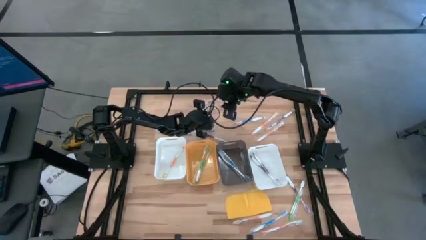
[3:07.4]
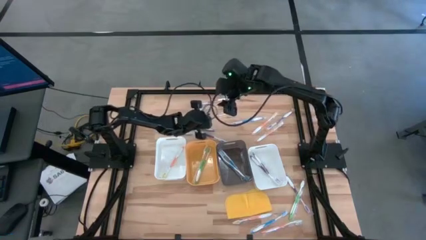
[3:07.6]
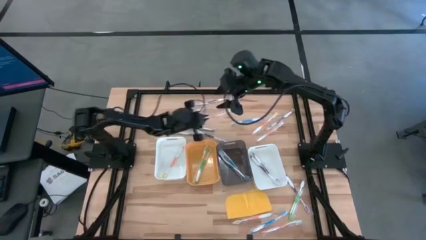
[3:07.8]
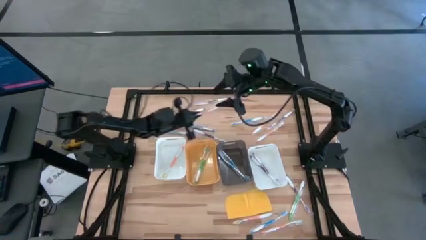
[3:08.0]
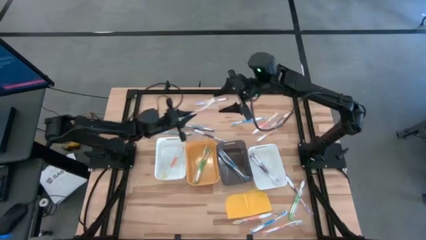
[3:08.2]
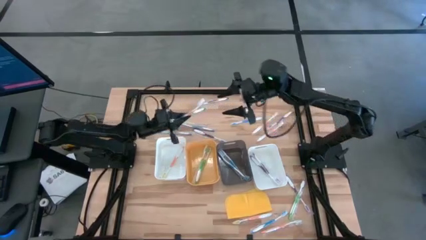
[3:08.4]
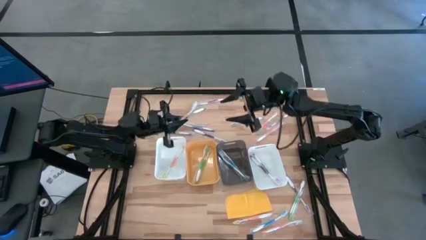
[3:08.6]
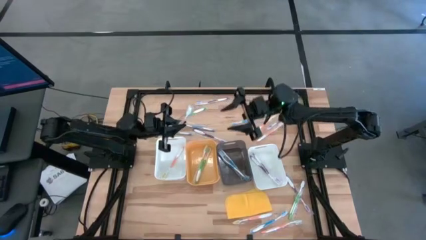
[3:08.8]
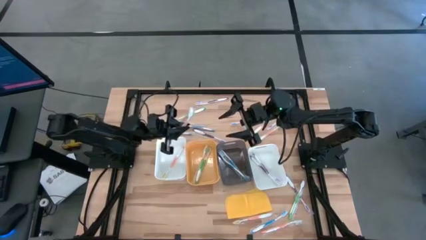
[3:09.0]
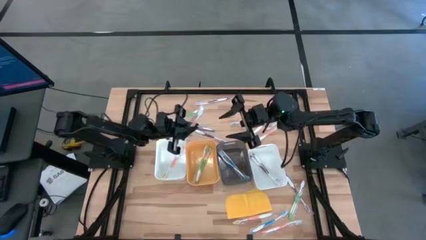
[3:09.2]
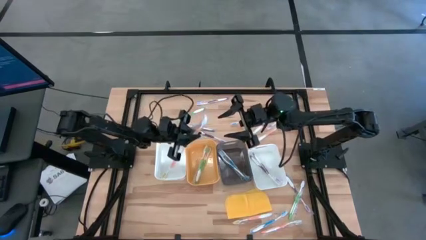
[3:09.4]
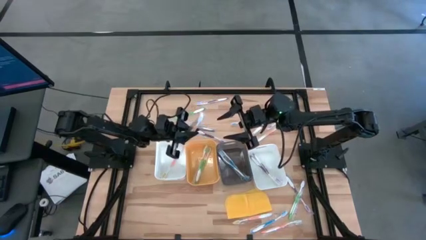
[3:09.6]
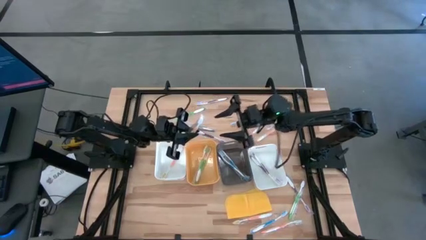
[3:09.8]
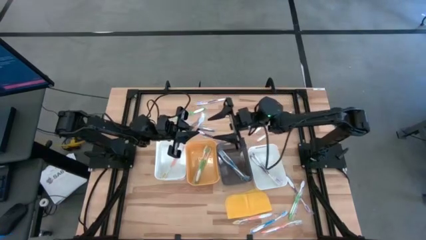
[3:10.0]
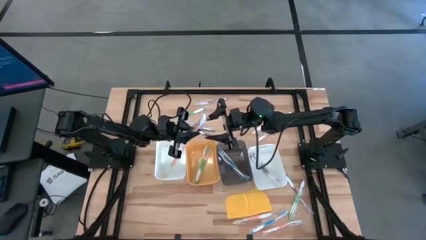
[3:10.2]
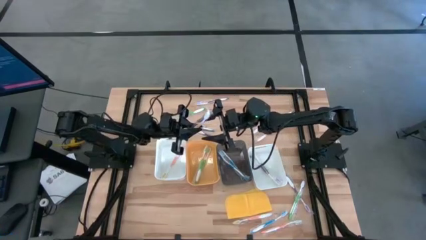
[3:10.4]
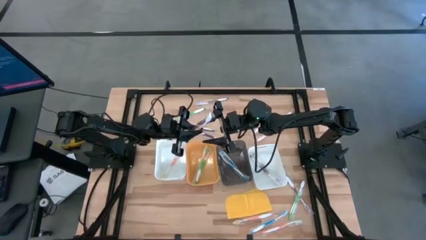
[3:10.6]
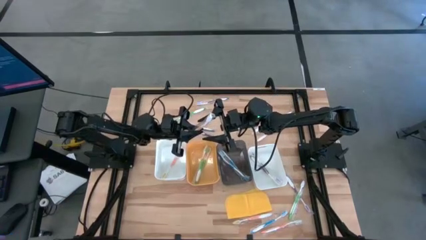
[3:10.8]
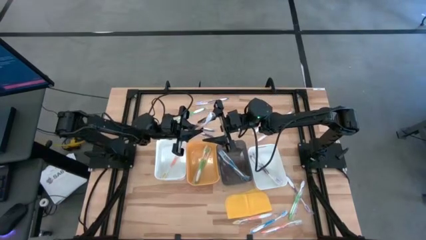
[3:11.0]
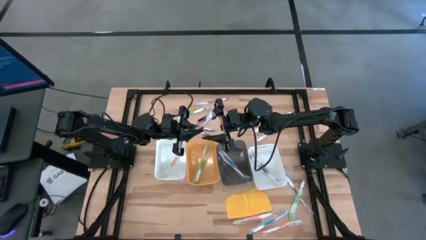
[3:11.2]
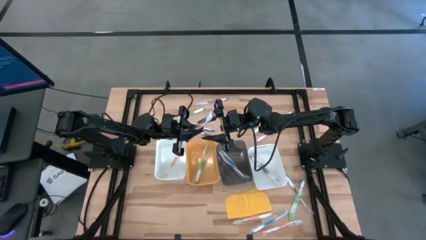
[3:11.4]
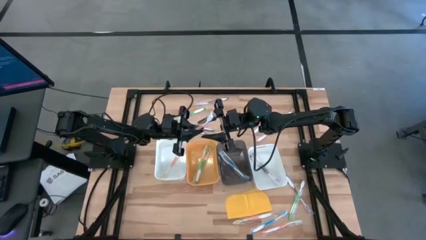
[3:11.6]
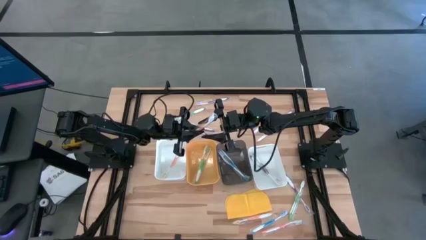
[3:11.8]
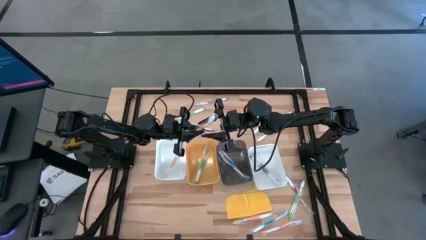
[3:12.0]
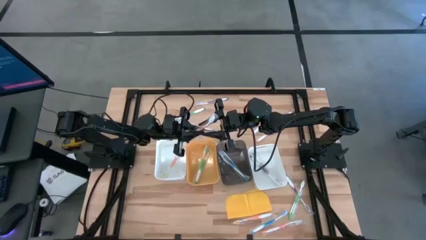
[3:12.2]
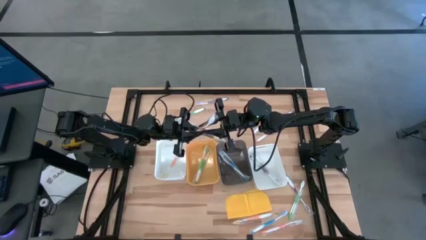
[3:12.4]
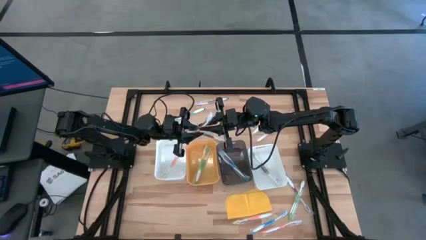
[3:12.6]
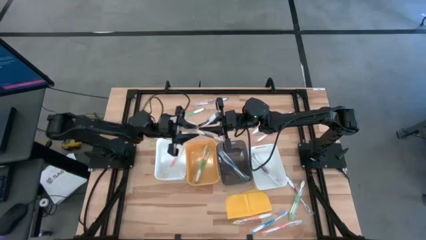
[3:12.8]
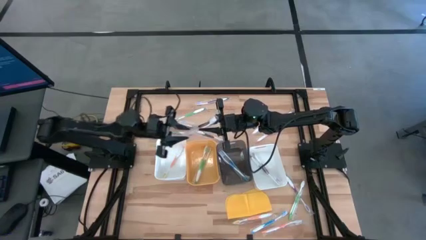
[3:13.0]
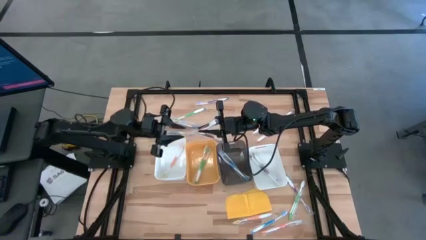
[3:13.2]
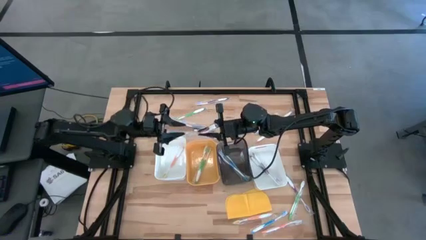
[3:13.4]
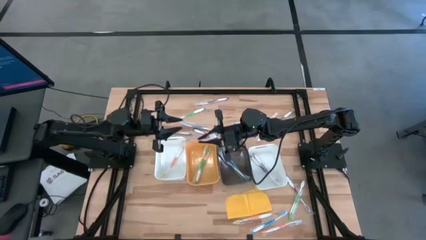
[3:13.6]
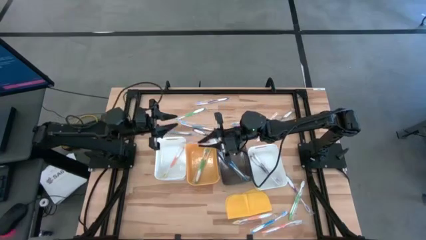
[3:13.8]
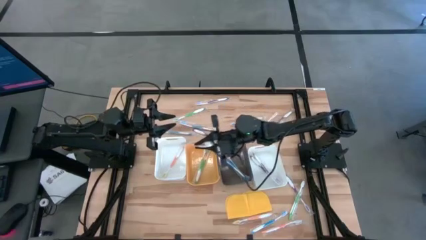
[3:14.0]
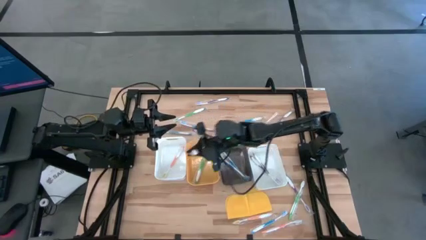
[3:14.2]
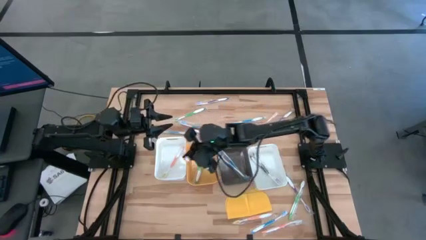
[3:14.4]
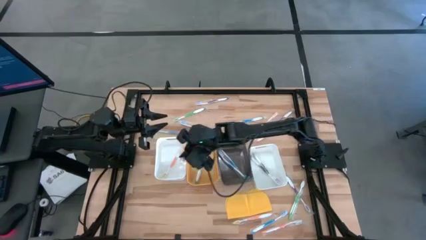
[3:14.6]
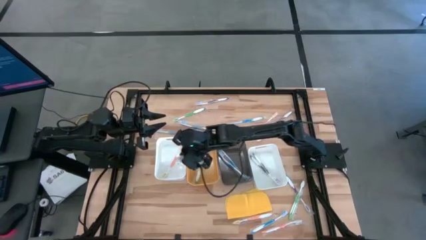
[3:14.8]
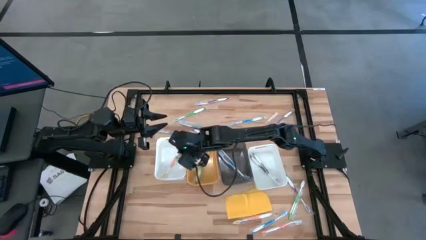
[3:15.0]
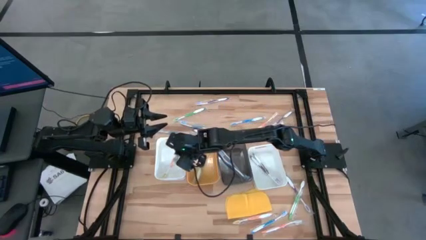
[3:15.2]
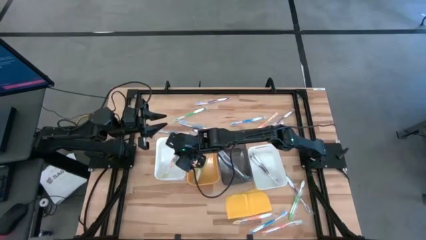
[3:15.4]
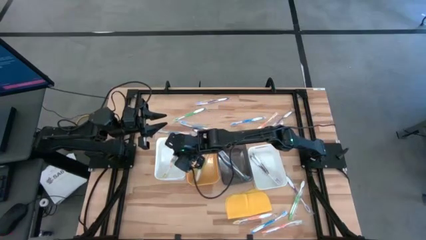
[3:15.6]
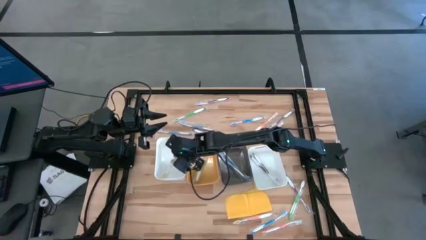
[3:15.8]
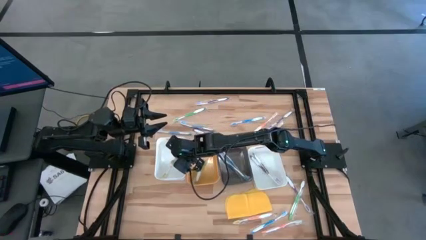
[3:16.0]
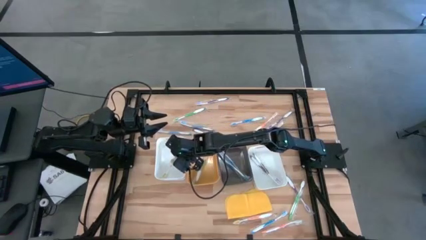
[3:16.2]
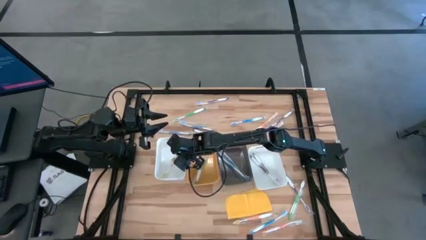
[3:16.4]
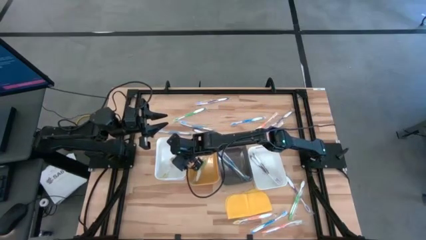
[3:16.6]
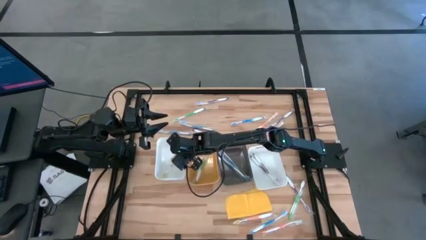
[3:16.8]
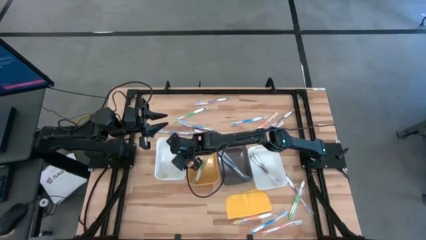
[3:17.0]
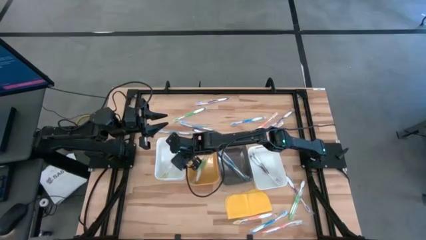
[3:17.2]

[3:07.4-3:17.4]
Task: Pick & Place Toothbrushes
Put the orange toothbrush into the left white bin

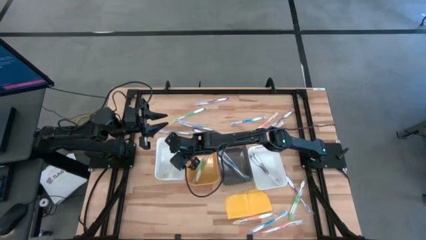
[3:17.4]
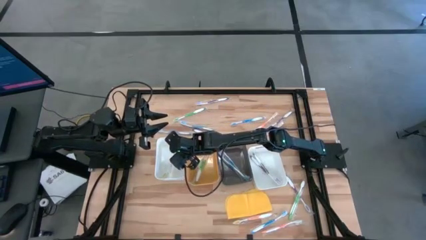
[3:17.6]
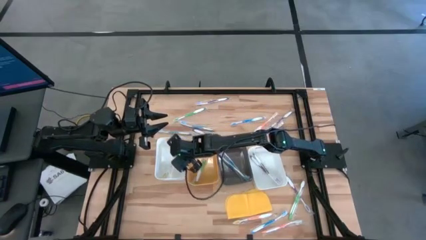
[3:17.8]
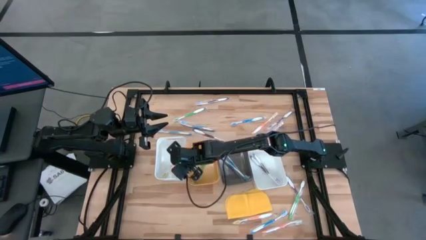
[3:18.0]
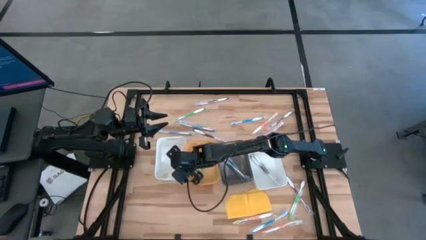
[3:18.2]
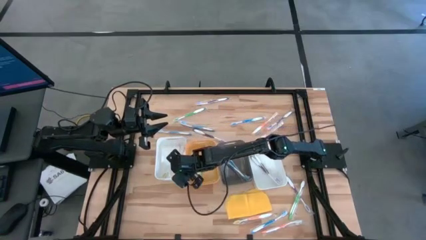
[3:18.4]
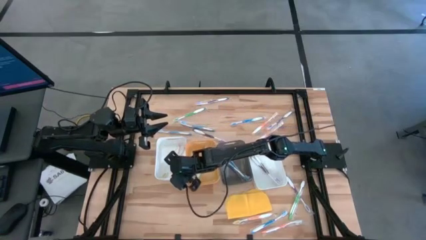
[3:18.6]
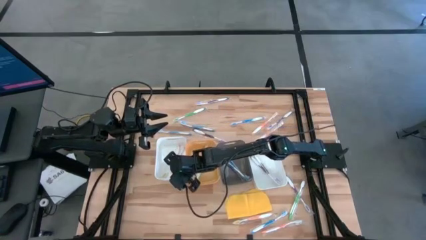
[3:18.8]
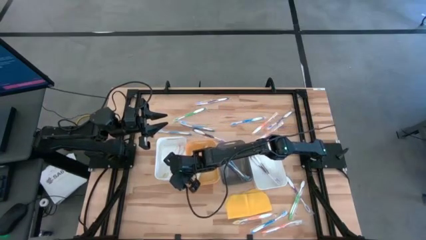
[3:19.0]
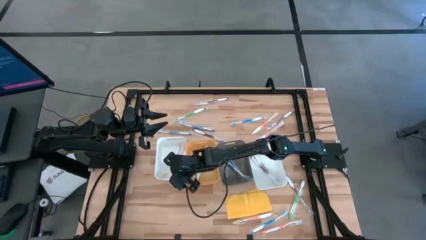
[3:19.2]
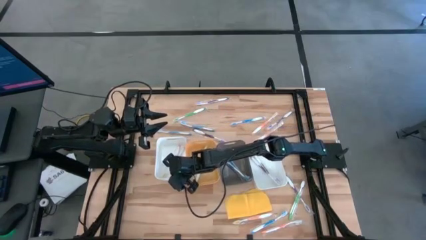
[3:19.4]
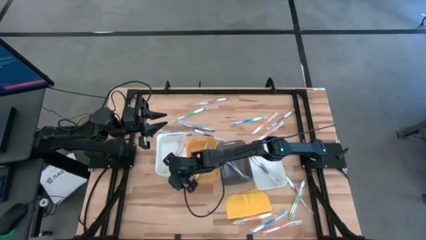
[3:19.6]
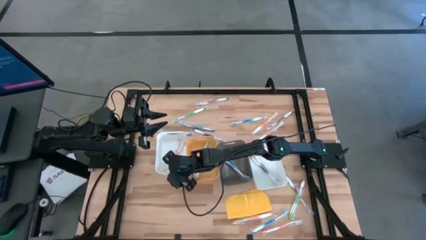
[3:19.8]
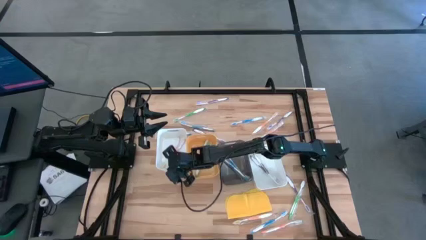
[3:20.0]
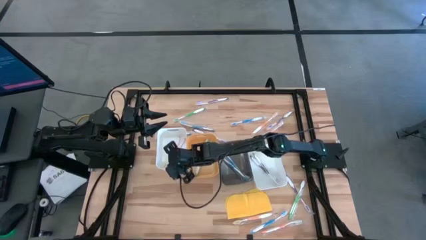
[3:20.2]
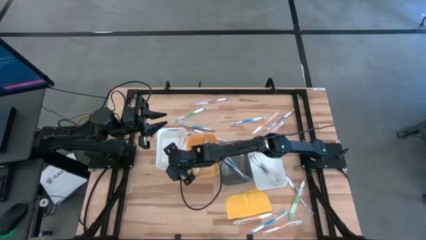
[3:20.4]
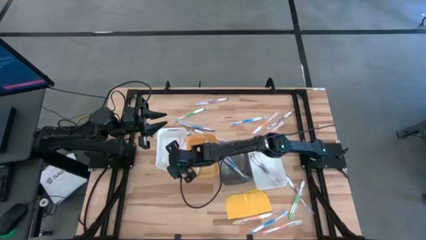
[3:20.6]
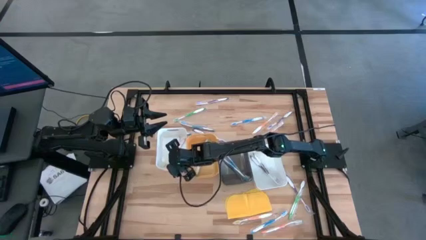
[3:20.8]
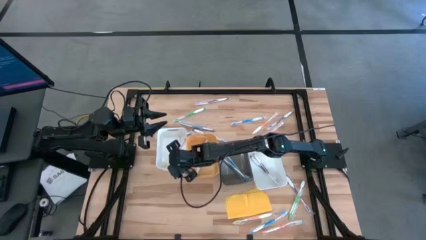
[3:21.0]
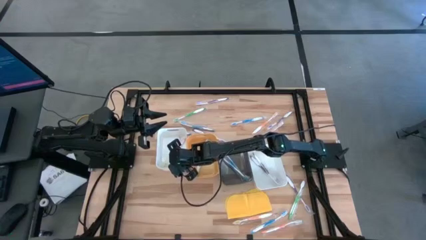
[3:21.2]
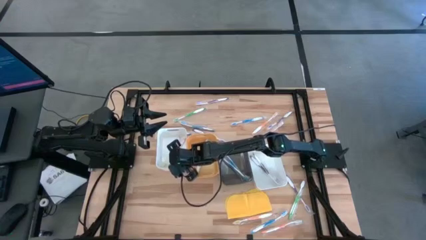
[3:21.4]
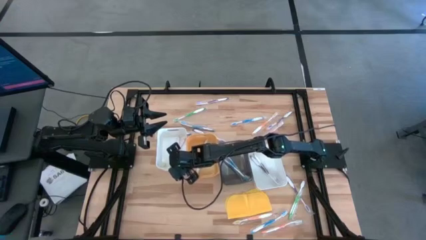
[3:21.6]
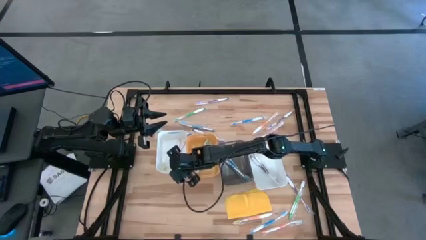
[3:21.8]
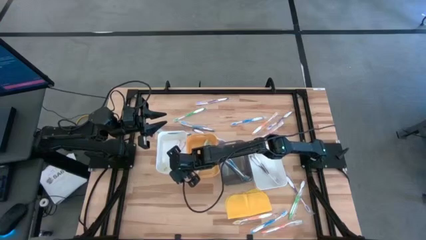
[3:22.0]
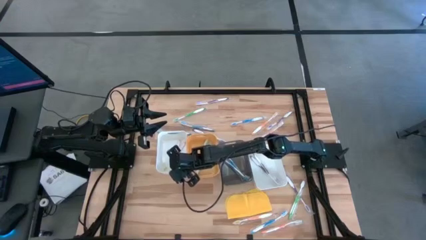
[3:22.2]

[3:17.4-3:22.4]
Adjust the left white bin

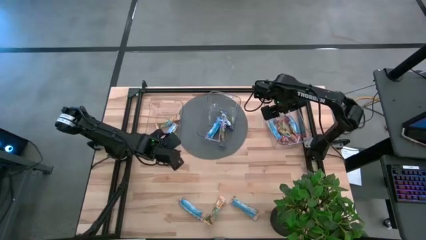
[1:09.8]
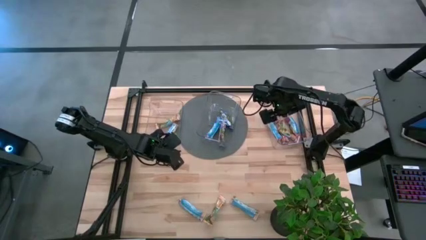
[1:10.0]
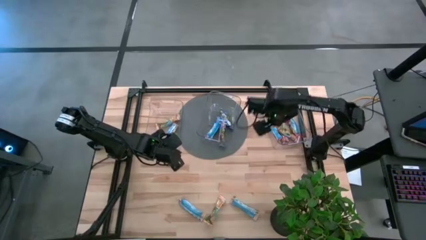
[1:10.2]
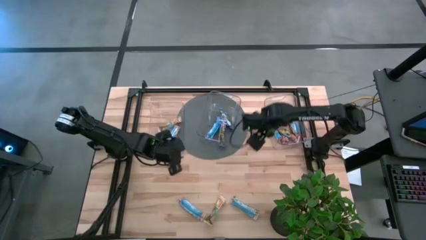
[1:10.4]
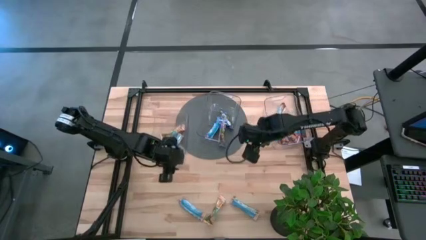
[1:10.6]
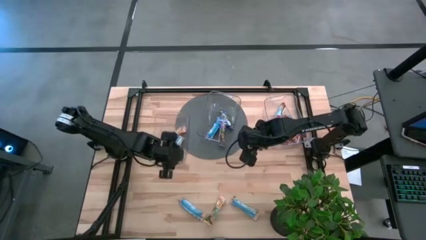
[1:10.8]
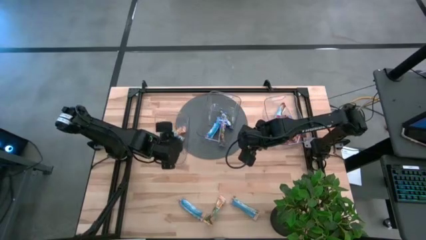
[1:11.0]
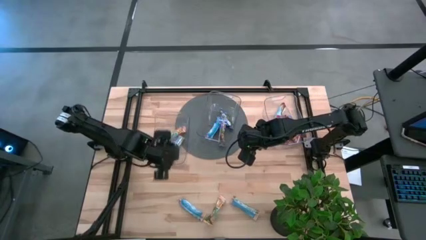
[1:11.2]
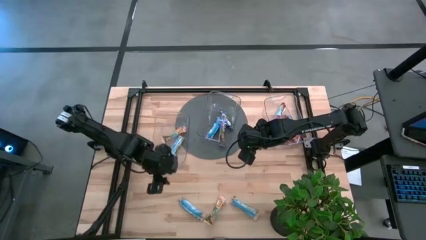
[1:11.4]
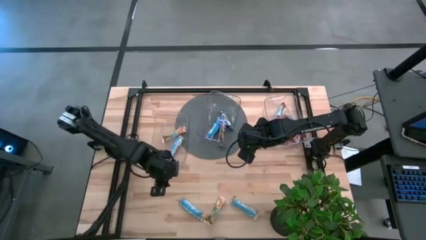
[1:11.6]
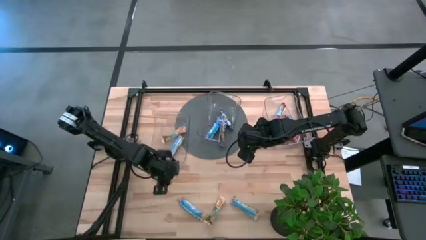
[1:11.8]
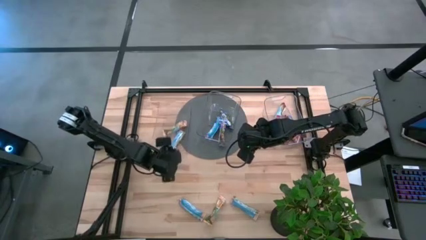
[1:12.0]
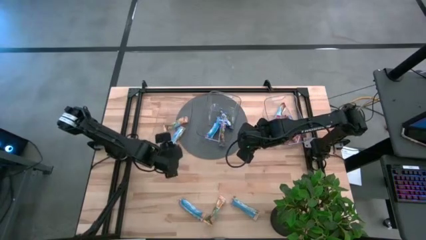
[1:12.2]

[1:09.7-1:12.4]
Task: Pick and place Granola Bars by type
Adjust the left transparent bin
